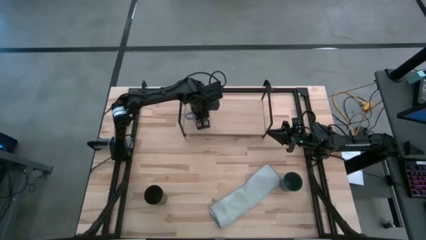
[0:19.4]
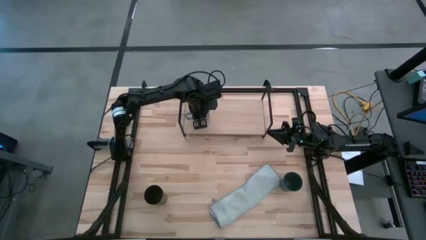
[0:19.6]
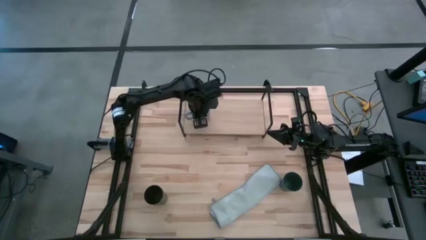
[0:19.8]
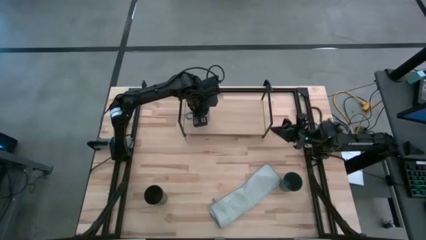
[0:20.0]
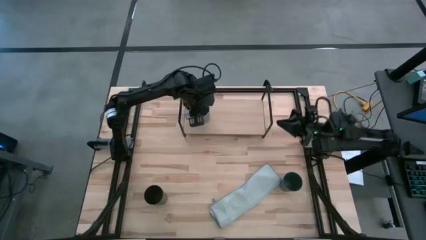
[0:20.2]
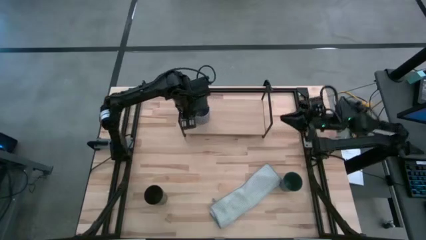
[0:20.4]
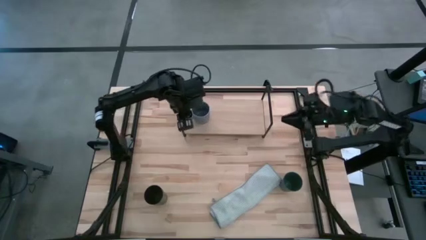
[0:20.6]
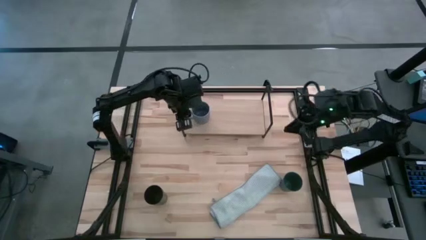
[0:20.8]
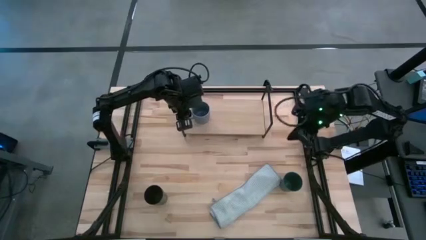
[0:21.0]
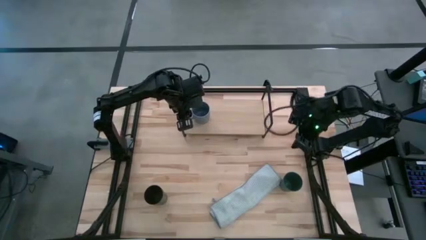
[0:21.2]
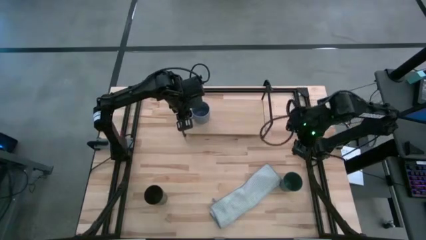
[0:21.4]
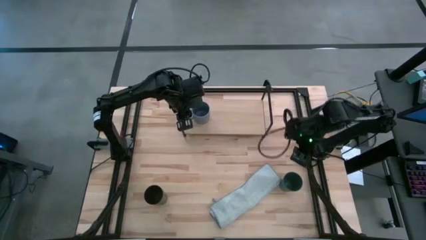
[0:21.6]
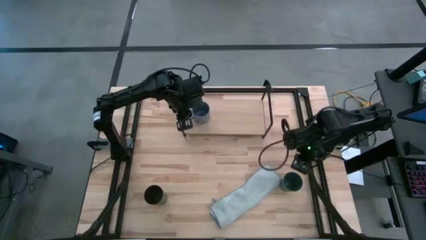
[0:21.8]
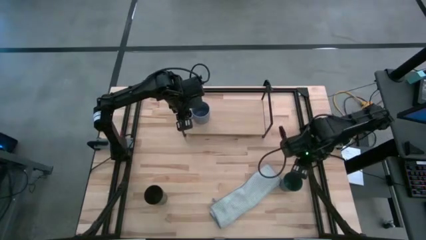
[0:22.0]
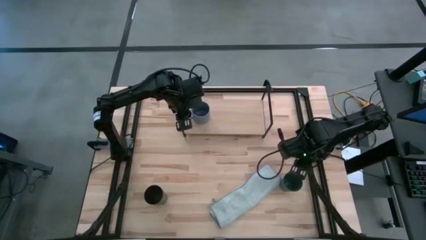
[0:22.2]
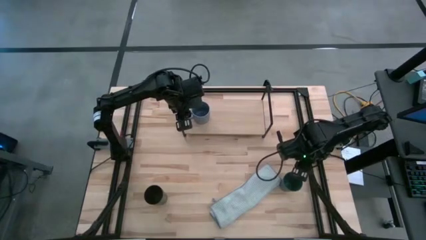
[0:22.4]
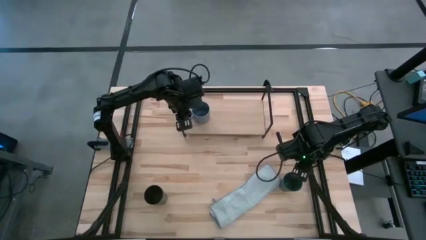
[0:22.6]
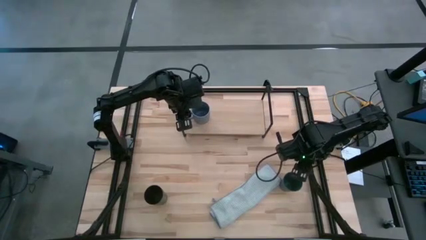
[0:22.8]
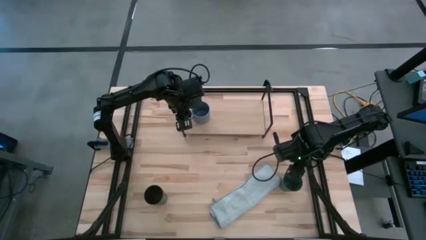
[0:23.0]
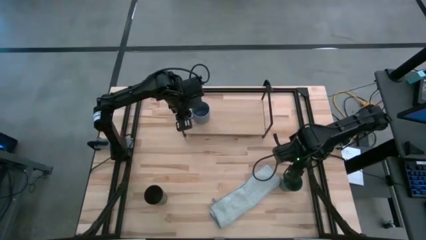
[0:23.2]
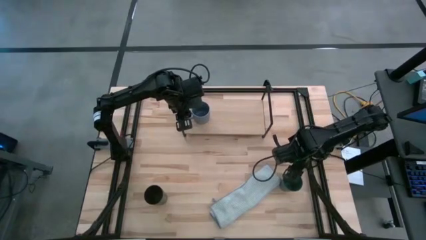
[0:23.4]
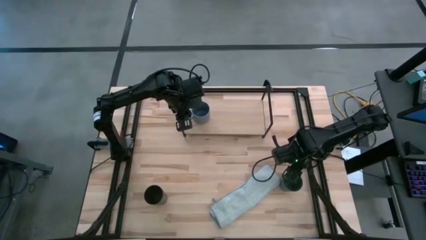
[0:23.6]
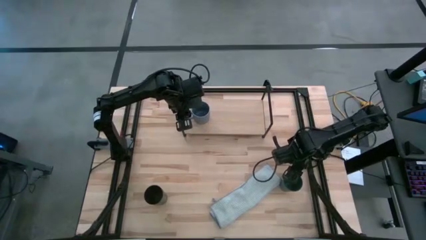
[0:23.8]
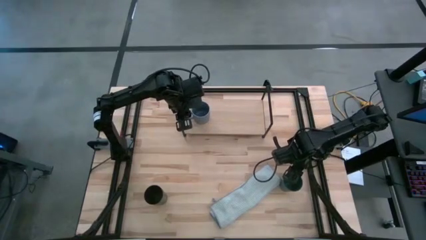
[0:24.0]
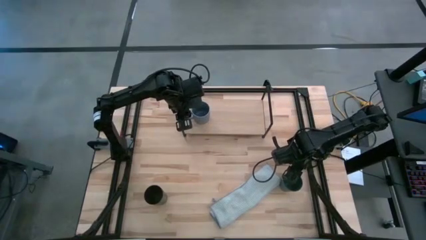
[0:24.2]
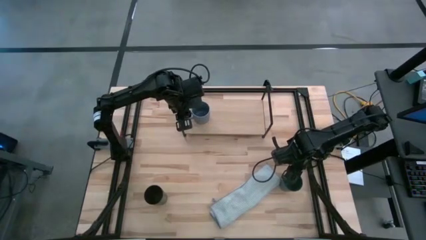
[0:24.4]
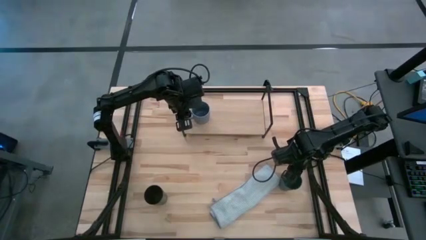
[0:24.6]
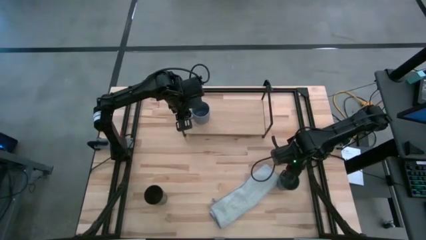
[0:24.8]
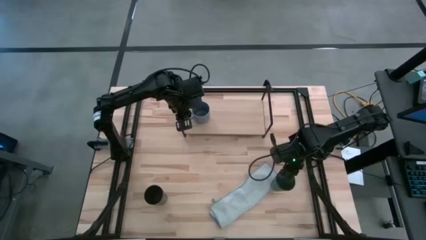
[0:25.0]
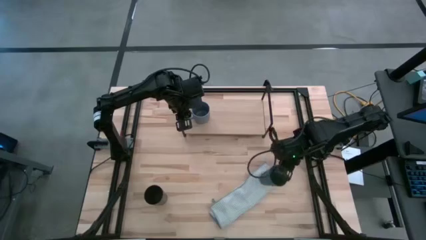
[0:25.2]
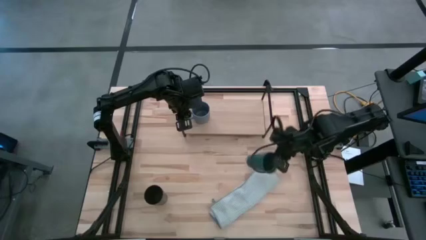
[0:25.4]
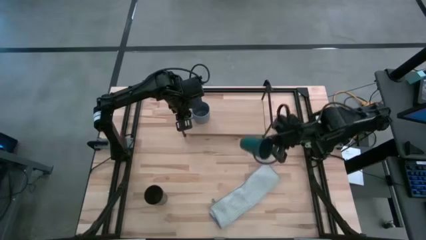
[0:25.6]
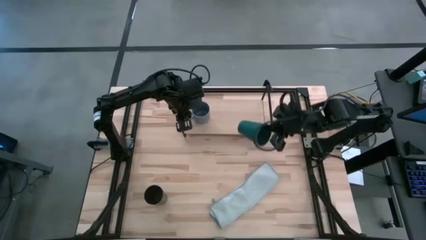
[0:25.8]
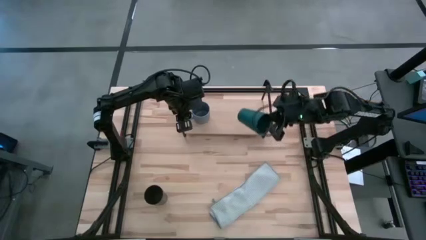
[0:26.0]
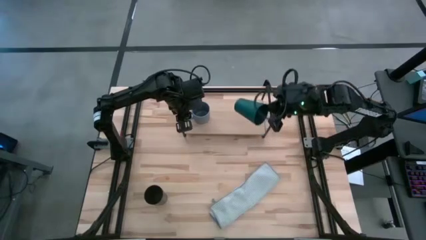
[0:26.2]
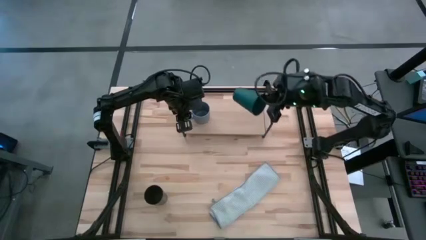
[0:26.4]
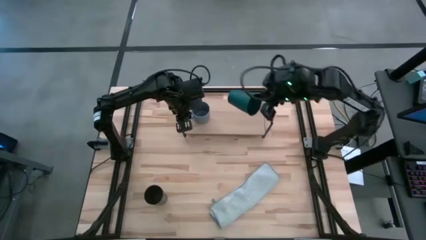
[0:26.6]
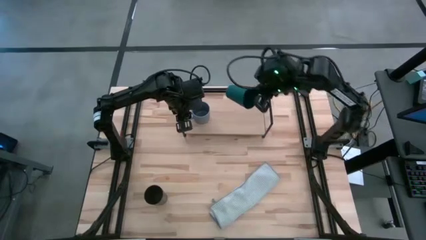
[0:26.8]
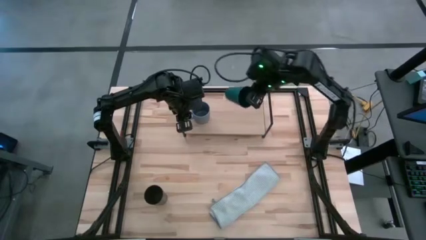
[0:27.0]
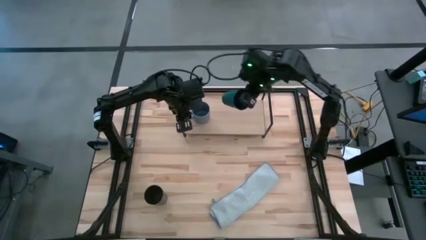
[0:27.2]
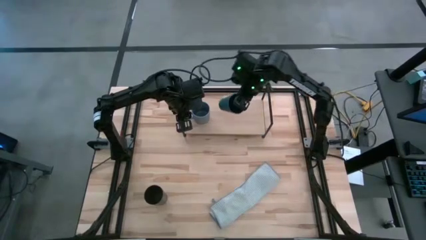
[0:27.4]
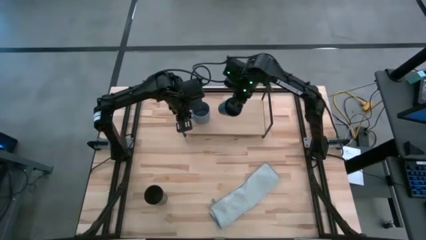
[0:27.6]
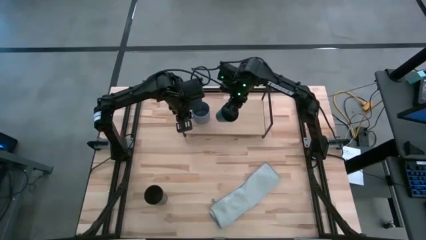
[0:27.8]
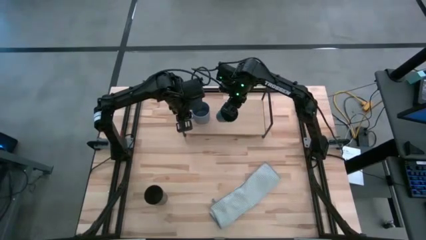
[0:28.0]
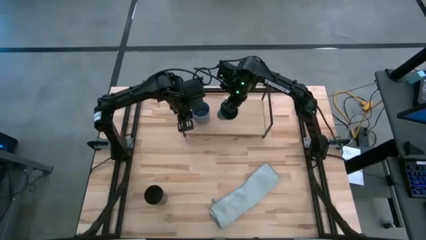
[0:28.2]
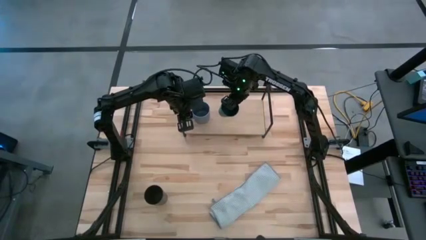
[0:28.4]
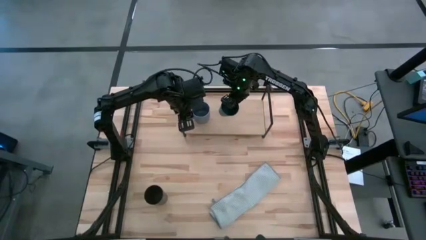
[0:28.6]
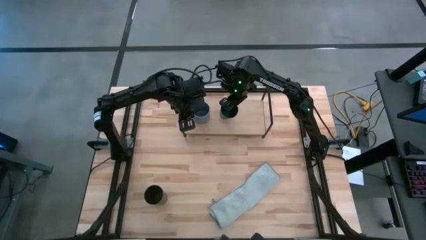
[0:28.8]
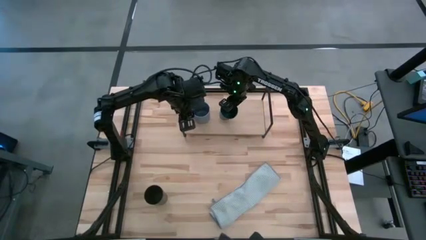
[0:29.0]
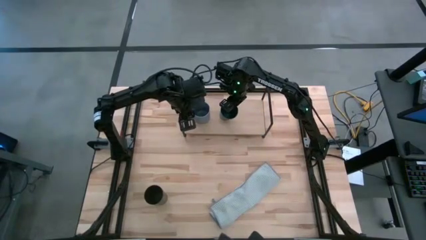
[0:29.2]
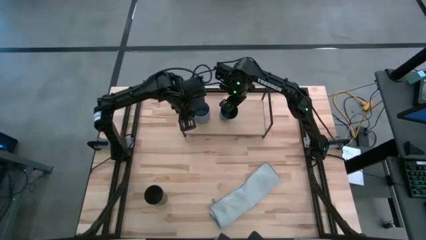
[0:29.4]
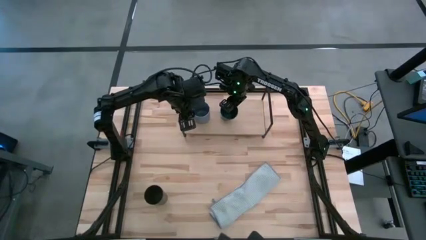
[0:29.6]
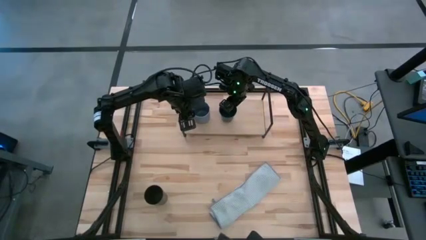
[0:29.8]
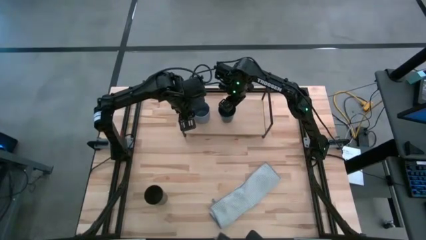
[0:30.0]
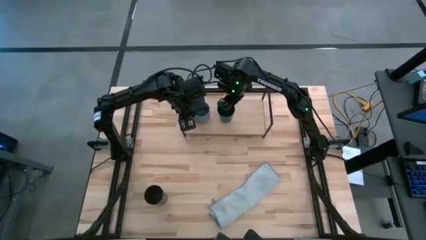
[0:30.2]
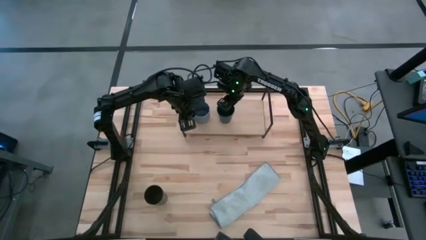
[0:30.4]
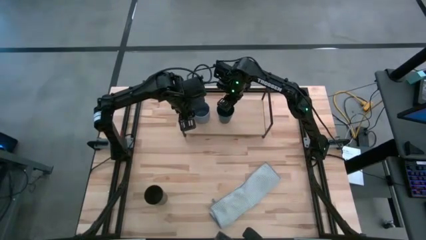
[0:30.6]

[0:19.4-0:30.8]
Task: Stack small to large cups/mugs on shelf
Put the blue cup on the shelf

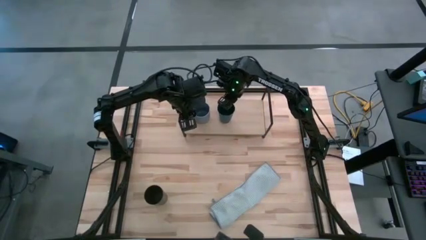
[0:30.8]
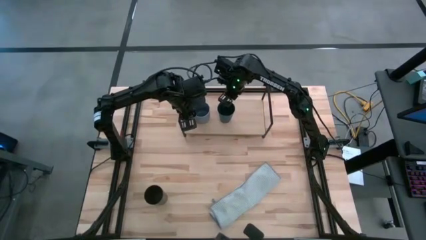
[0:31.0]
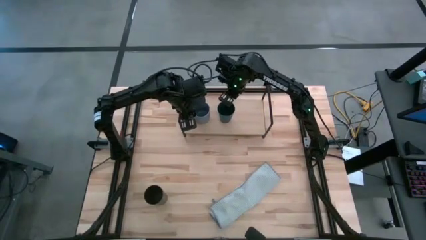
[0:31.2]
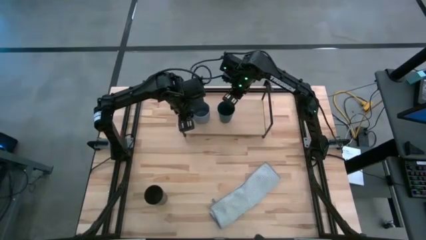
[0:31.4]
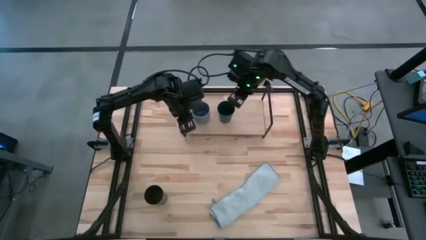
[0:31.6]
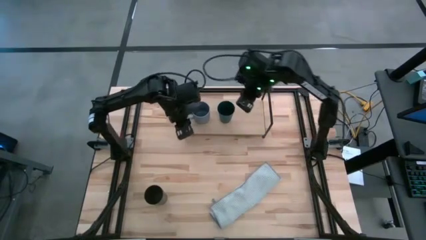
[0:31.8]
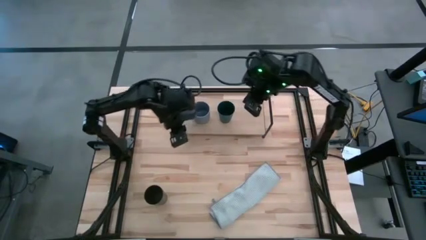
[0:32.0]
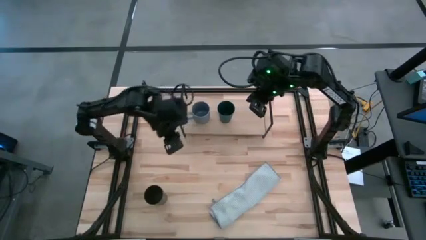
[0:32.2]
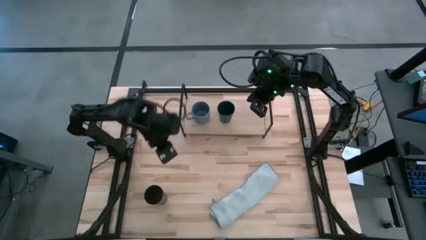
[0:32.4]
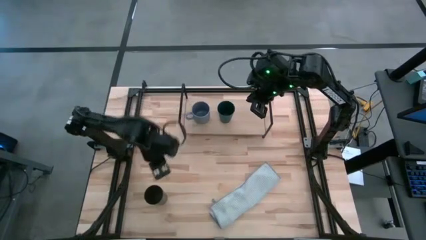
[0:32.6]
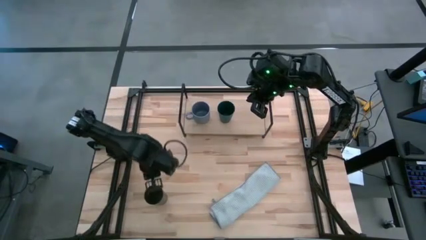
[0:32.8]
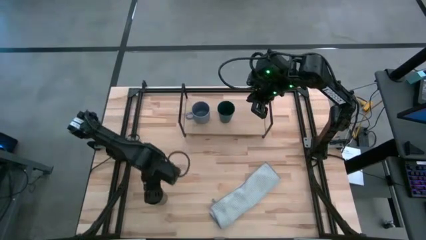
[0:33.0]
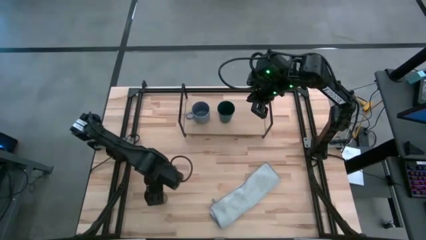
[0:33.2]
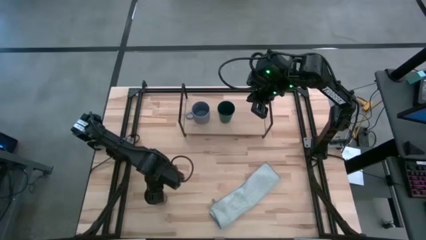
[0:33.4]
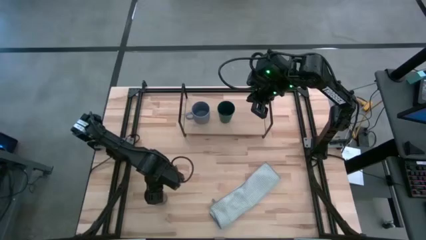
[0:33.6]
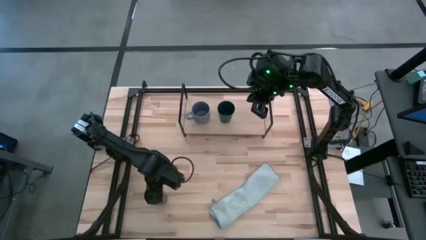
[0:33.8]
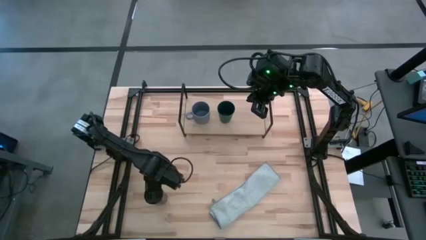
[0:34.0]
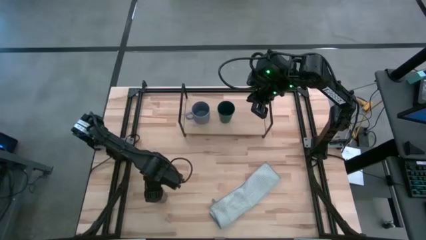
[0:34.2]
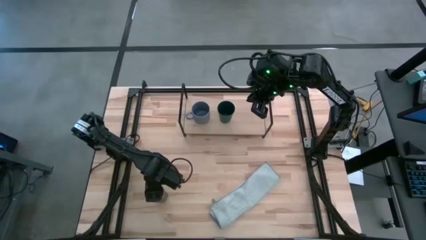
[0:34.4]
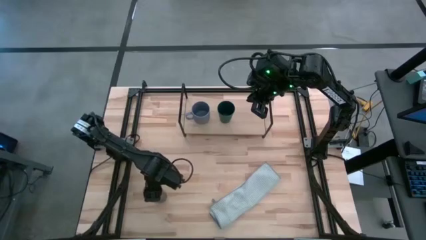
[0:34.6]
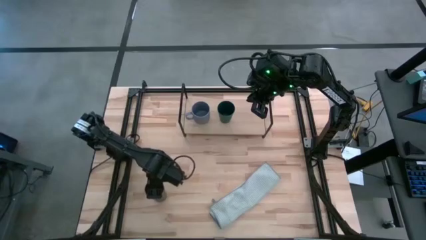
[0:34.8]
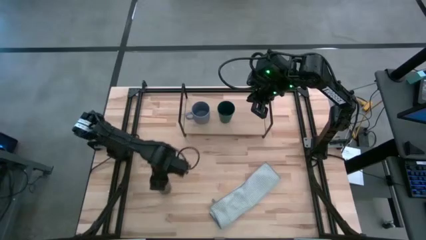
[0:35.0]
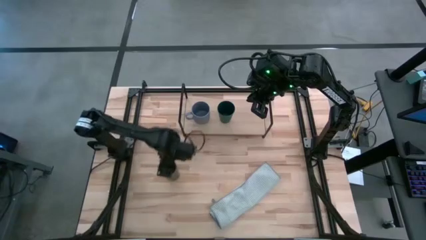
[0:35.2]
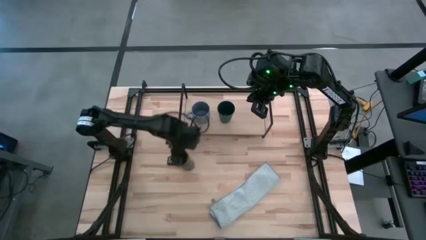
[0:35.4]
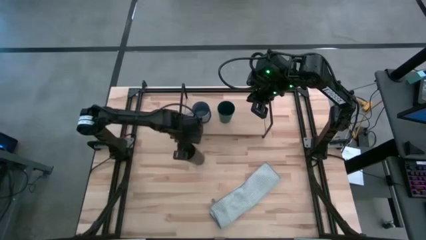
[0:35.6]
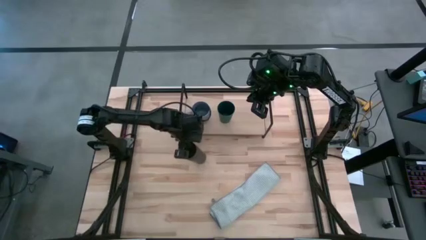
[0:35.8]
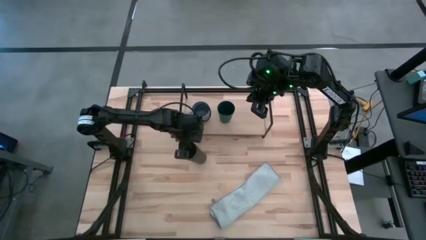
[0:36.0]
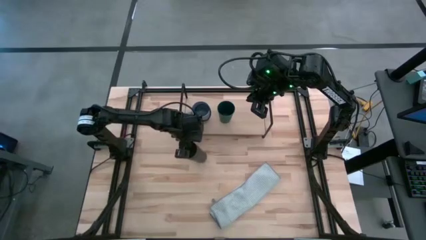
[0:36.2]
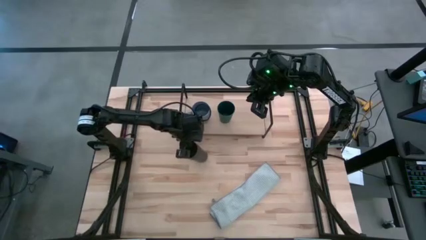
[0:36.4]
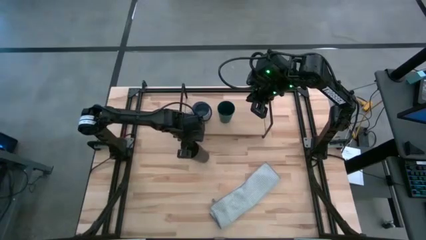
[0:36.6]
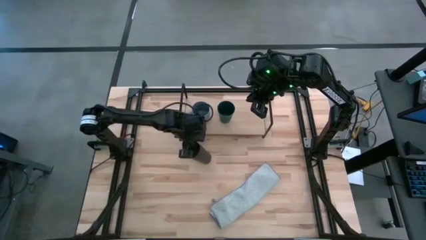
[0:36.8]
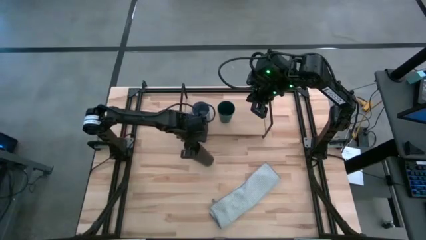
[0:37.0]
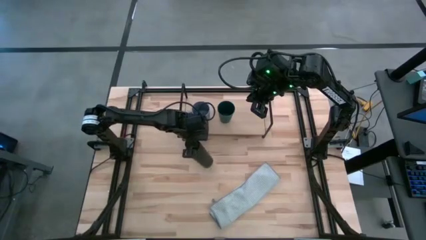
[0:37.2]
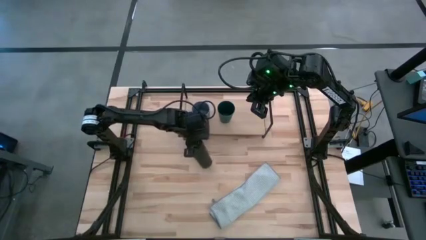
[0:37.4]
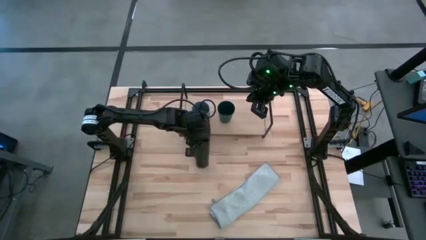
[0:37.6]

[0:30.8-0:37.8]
Put the black cup on the shelf

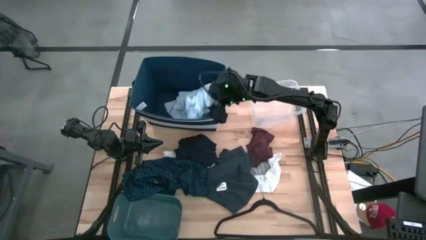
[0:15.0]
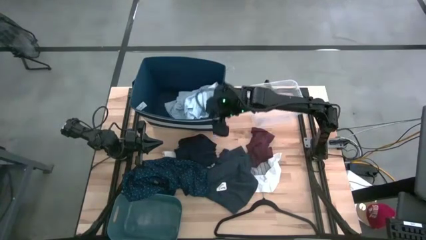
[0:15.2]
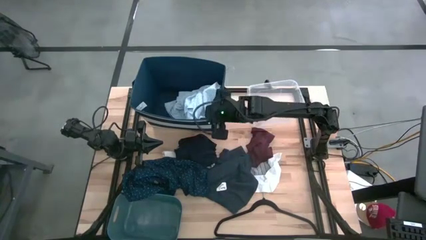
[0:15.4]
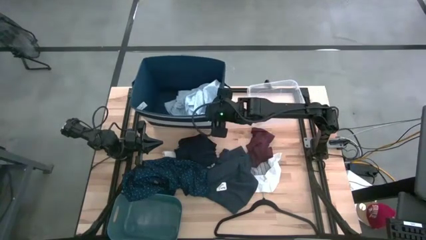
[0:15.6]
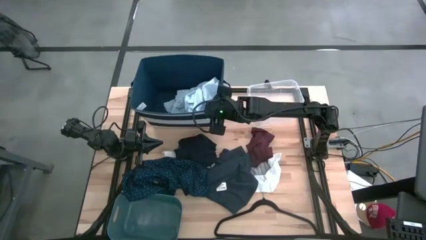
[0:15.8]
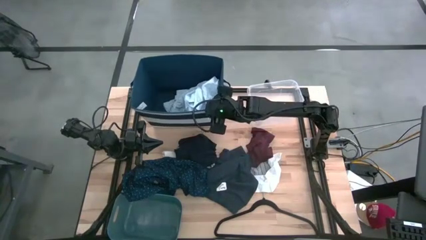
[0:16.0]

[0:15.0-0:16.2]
Task: Pick & Place Cloths
Adjust the blue laundry organizer
